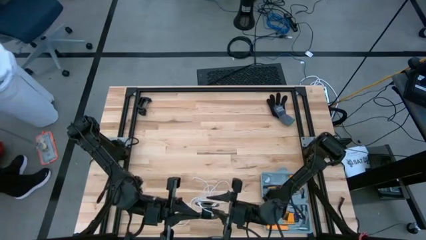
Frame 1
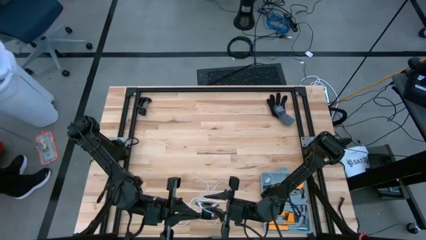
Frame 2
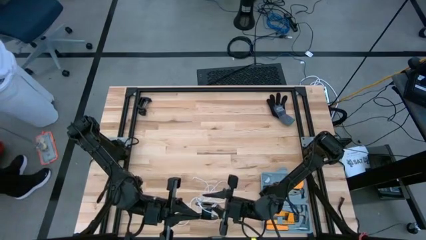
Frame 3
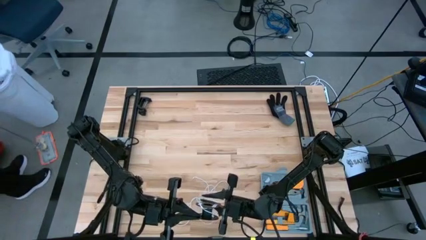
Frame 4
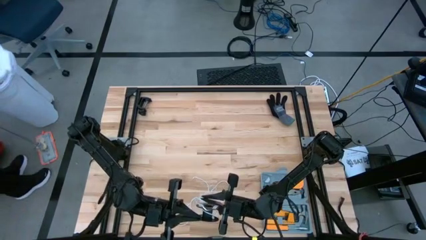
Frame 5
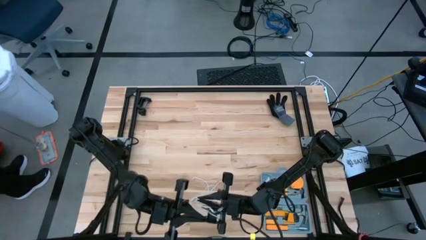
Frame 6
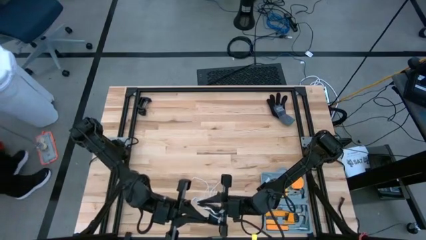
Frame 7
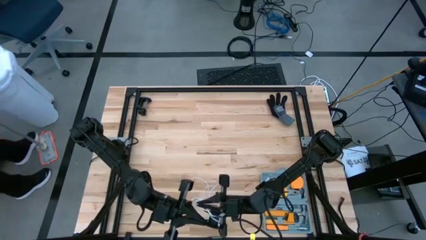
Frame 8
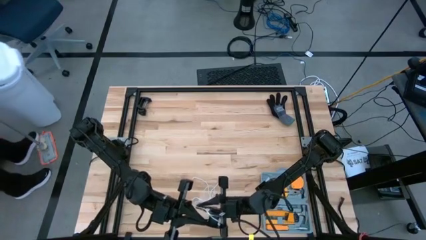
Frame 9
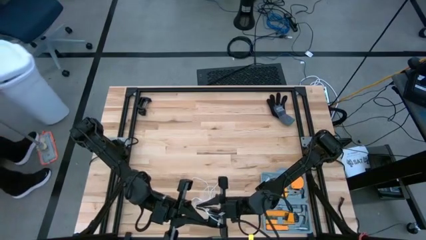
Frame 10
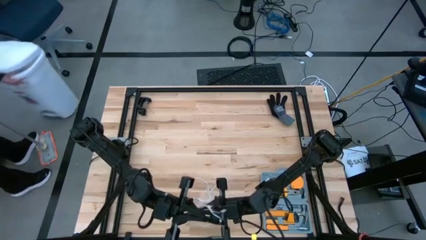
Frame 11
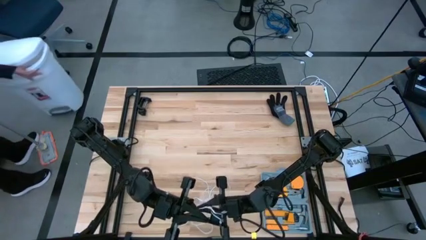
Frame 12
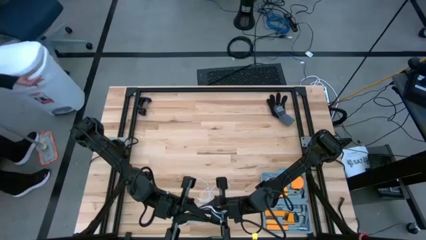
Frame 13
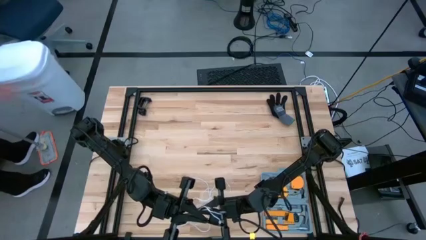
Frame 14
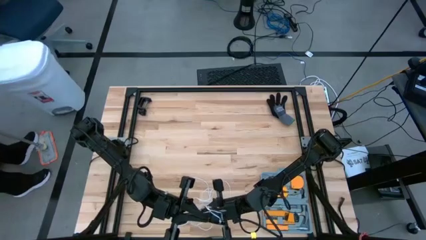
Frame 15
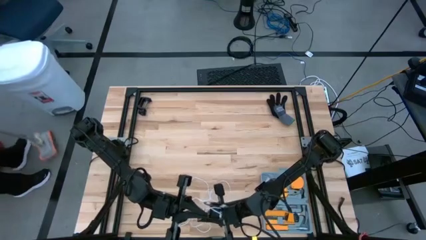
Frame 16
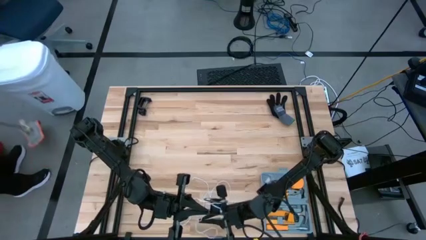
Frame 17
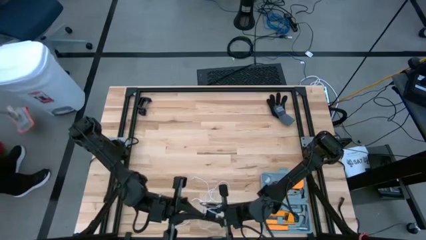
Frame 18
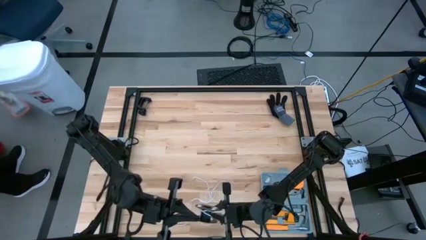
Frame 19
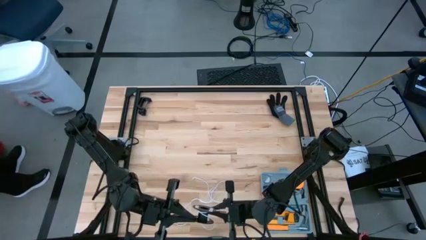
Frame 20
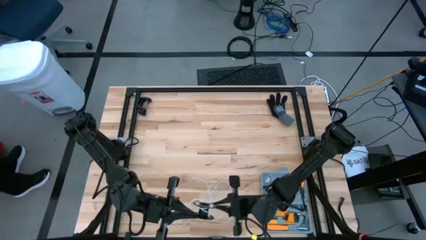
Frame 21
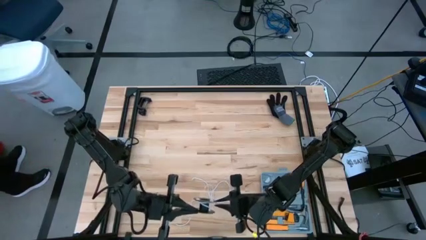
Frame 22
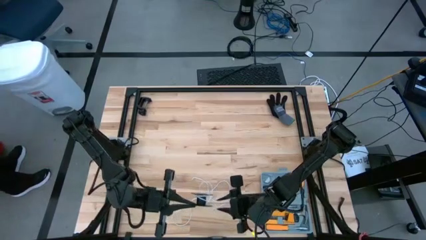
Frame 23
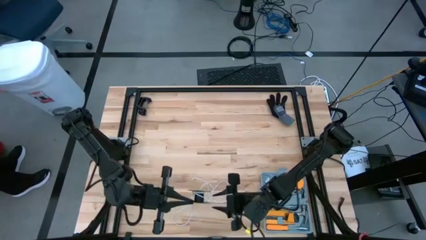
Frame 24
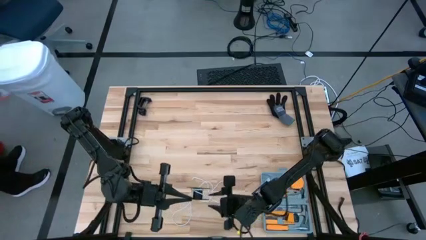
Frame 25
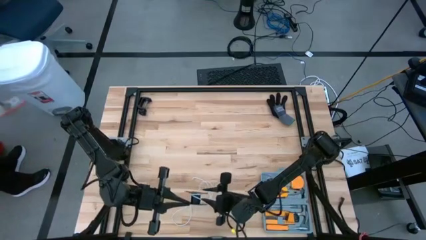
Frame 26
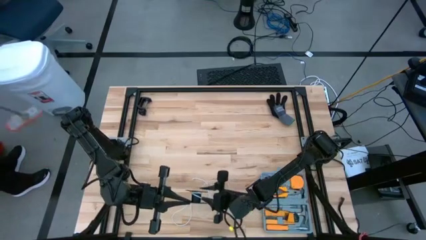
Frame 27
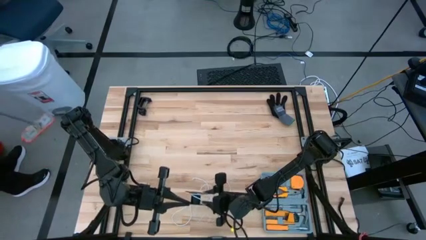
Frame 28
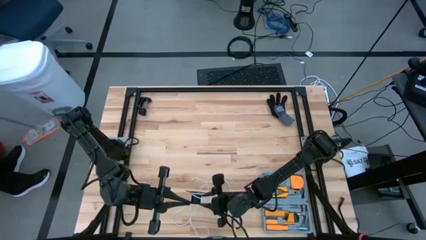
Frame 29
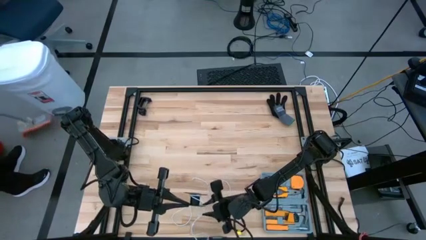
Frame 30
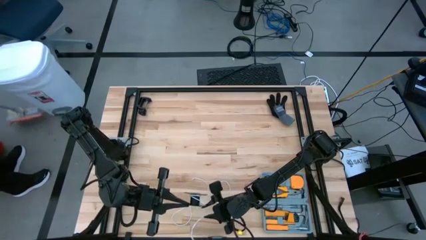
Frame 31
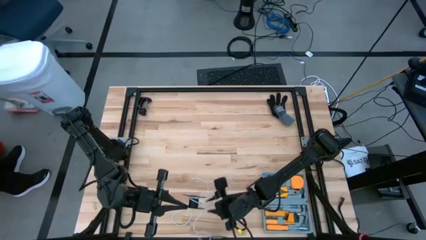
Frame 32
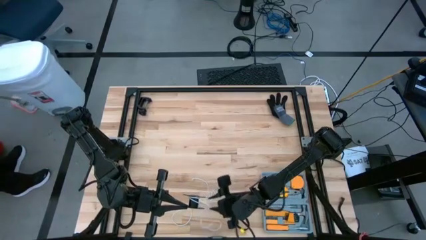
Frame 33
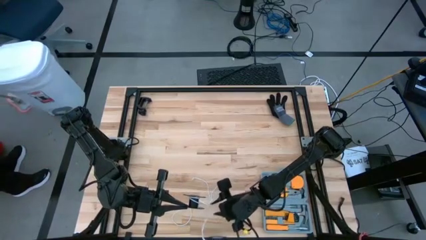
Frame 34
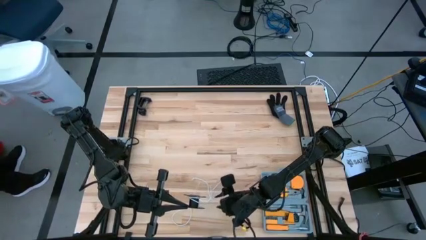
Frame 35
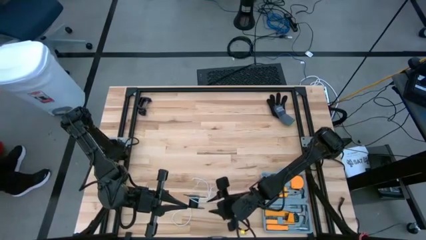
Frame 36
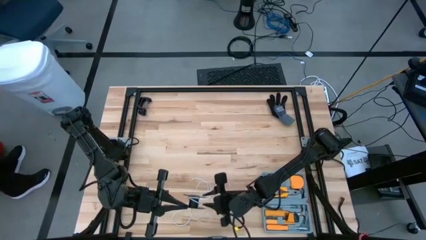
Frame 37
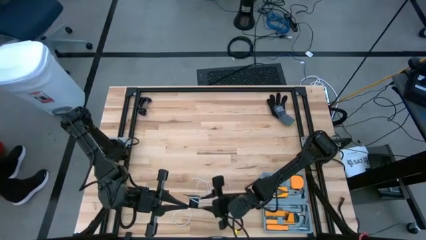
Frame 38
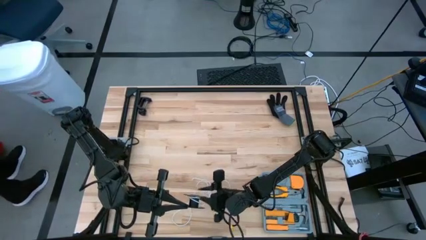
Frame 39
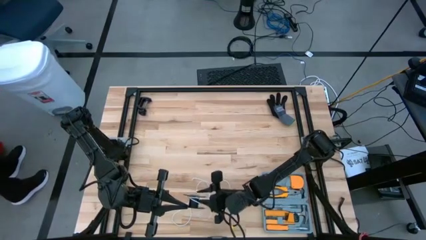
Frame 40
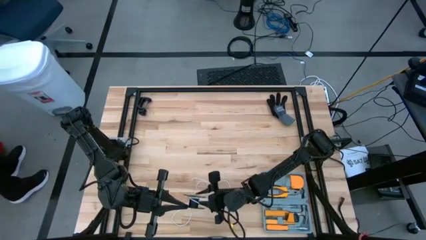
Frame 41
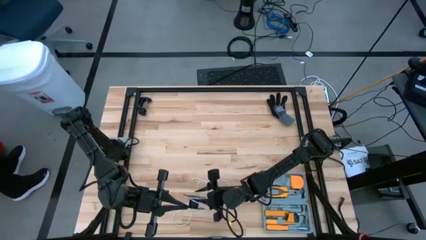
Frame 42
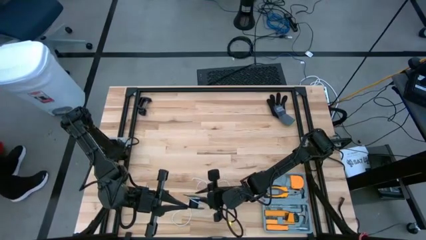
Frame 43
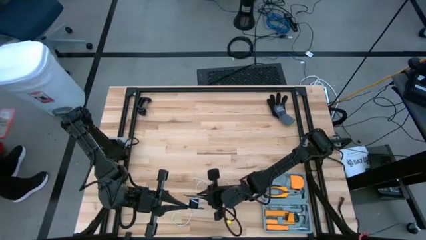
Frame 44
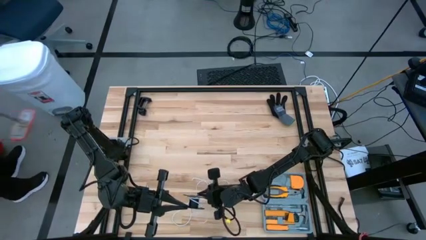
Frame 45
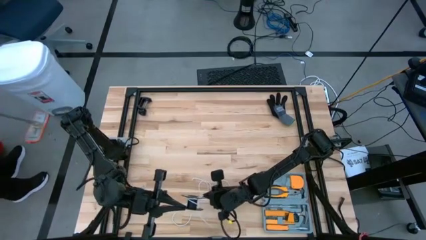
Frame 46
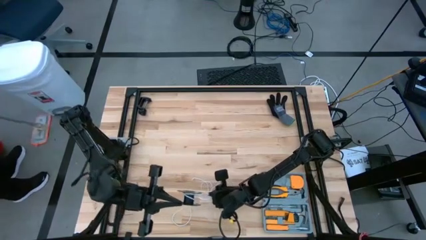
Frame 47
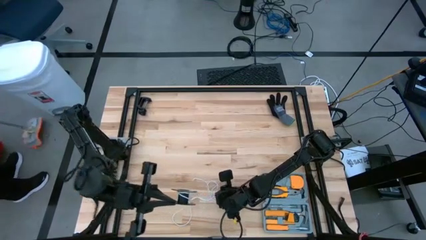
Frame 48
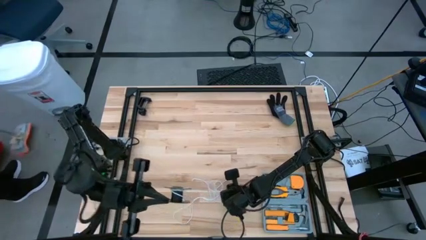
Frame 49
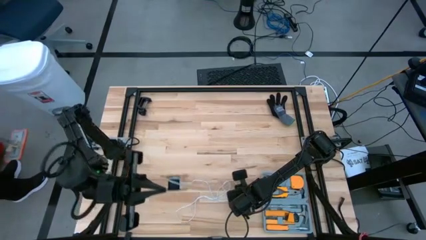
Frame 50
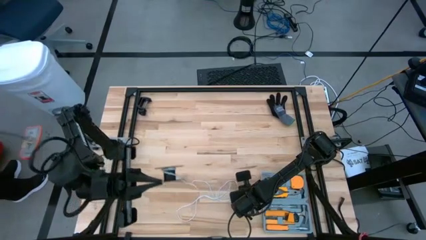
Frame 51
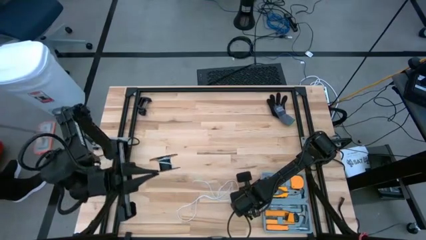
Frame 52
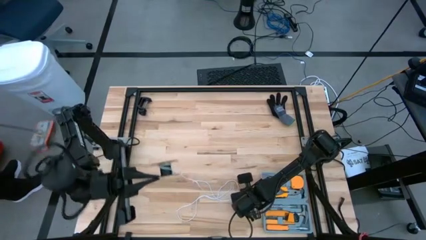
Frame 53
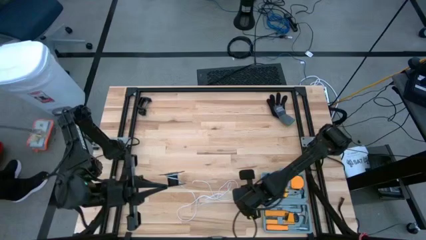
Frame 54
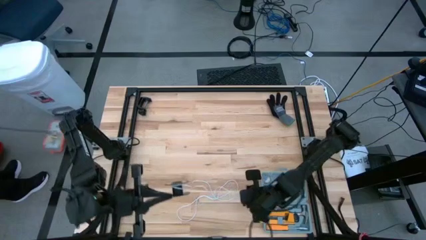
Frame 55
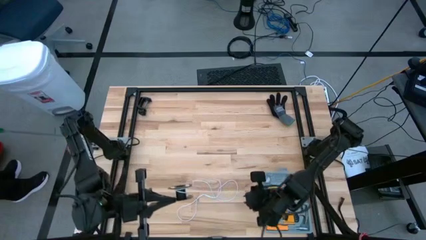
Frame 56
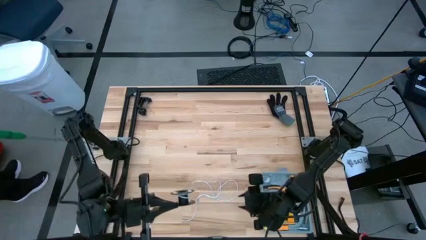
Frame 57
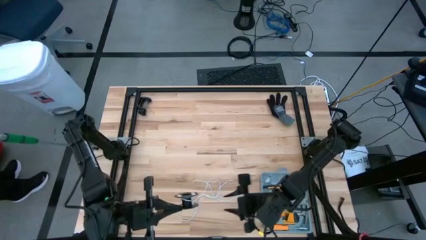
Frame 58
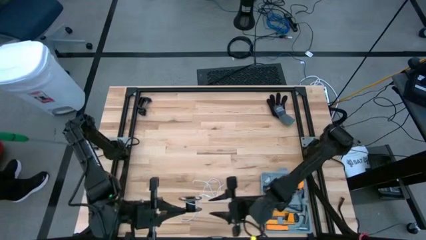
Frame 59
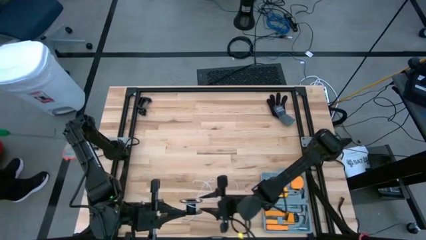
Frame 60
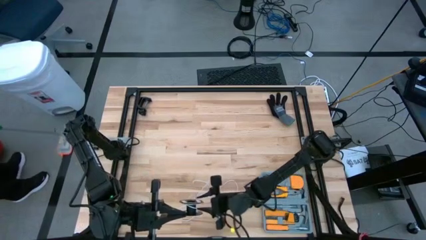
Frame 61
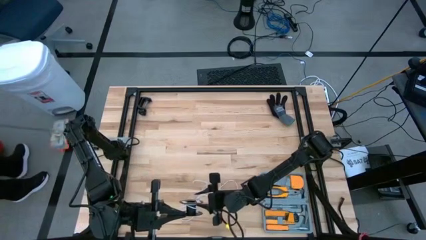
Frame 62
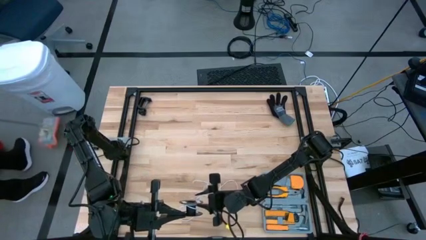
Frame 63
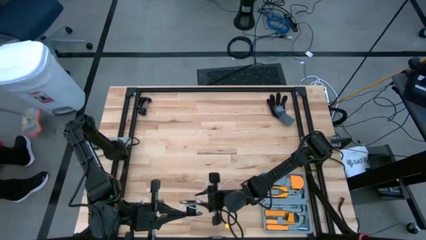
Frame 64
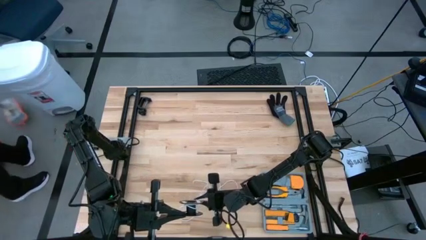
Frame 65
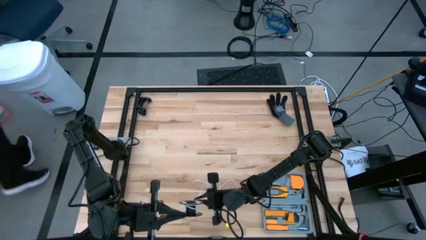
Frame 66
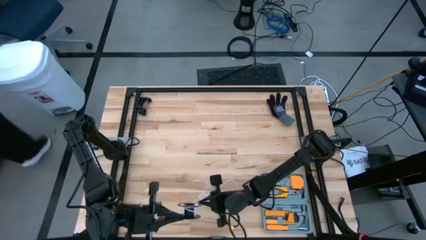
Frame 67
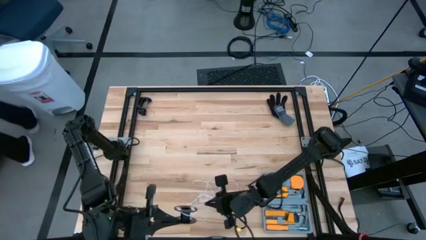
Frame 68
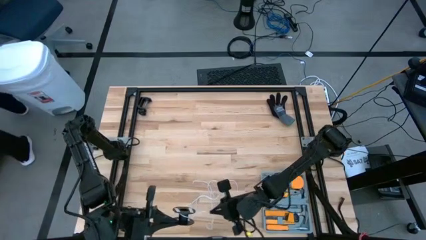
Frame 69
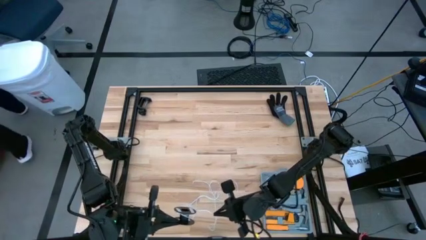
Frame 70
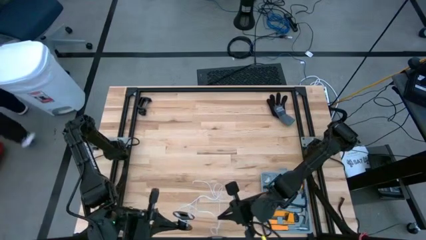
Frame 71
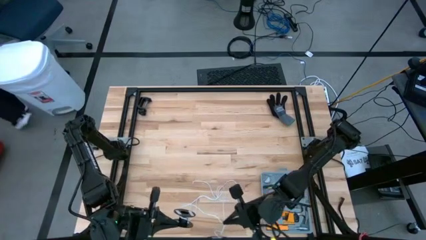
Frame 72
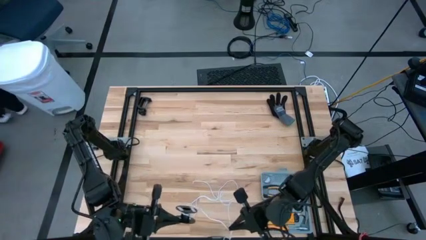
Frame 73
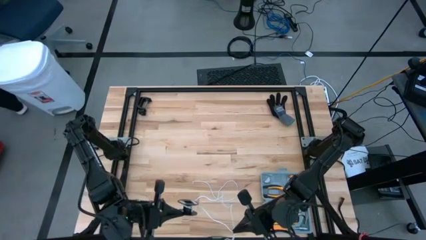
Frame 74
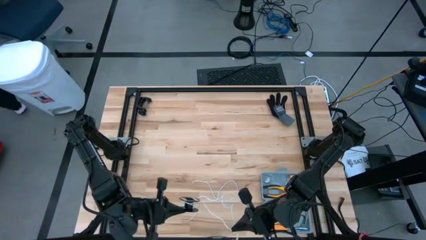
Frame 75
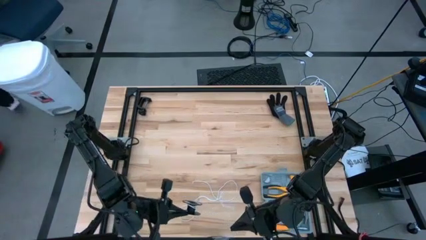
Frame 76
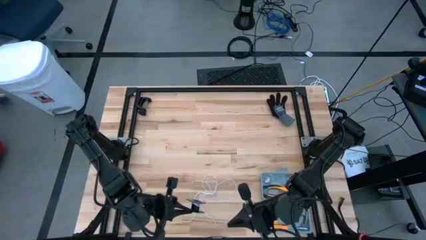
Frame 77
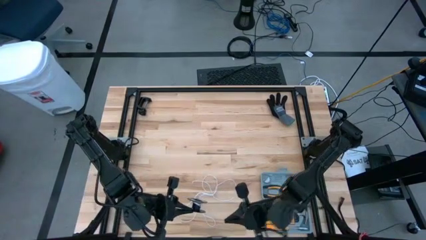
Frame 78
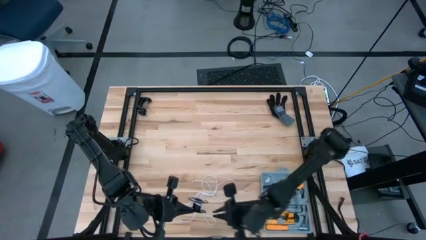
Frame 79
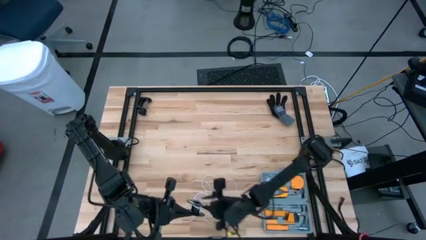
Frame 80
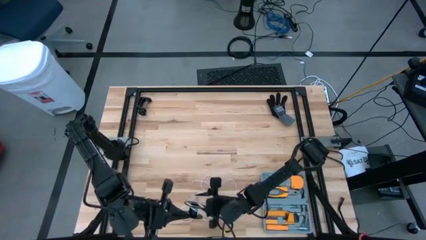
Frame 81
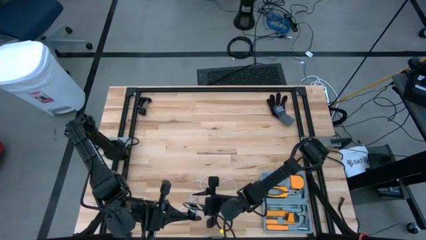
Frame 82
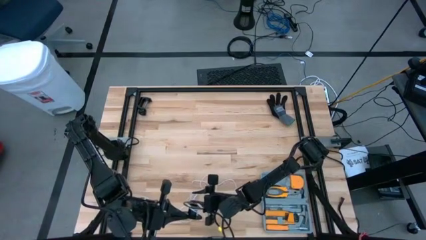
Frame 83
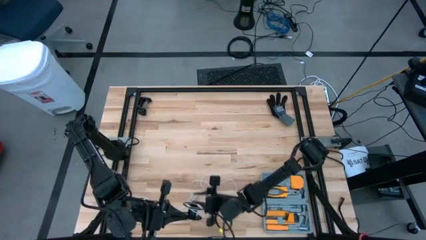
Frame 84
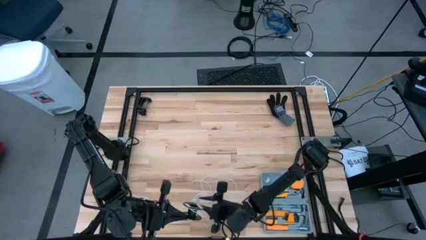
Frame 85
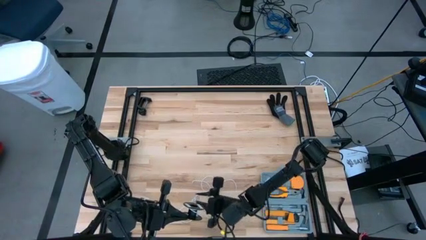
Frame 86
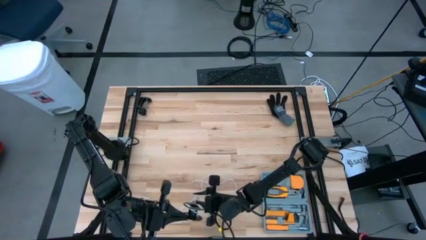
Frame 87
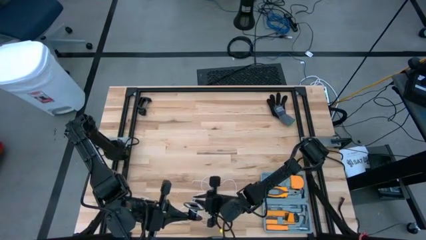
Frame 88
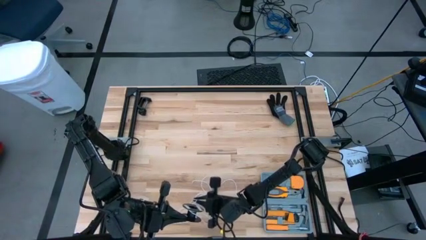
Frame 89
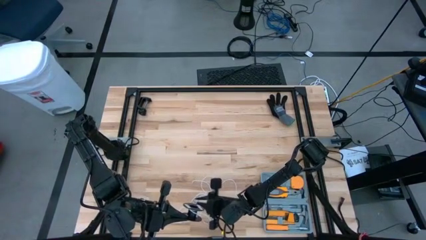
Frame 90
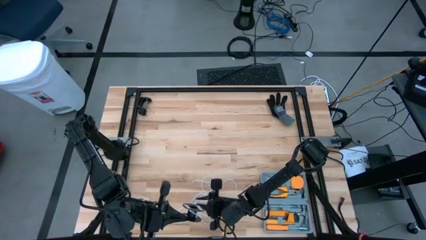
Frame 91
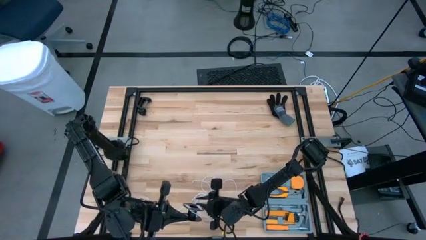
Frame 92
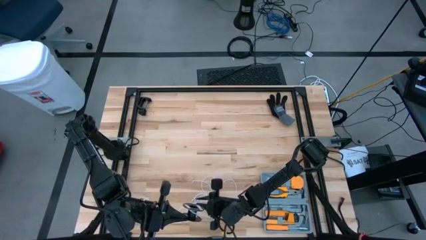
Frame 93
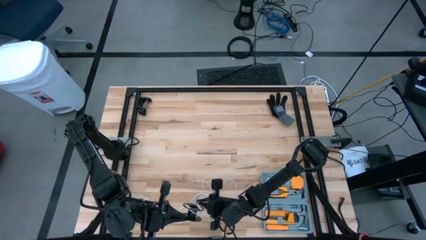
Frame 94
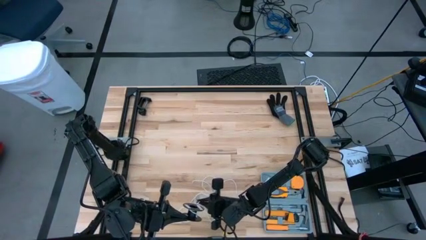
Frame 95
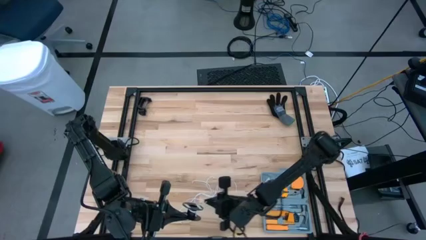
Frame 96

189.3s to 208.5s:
Task: Coil cords
Coil the white cable wire onto the spool
